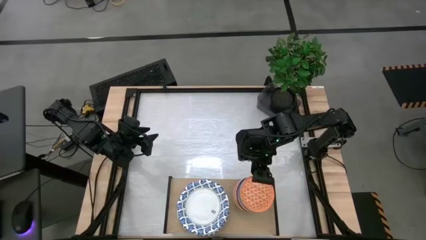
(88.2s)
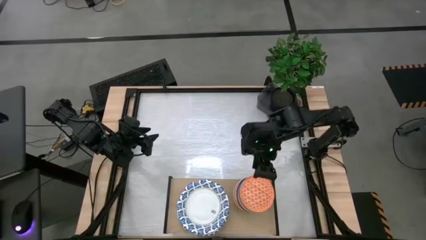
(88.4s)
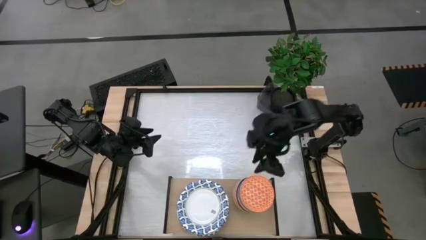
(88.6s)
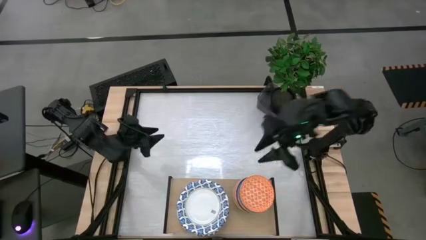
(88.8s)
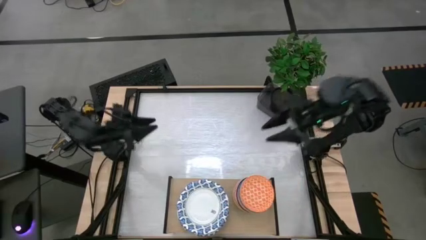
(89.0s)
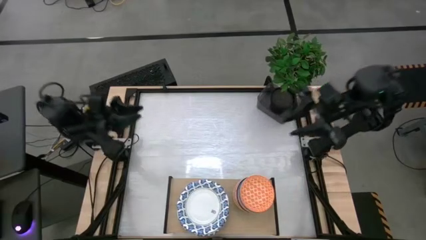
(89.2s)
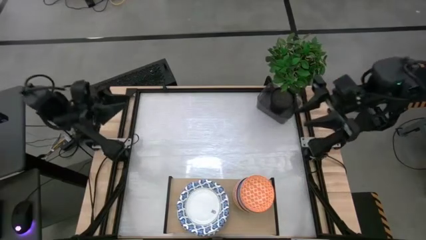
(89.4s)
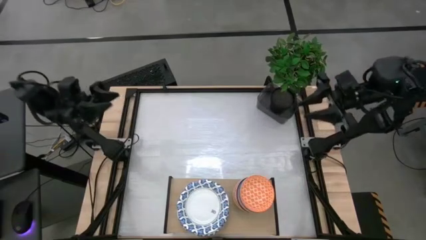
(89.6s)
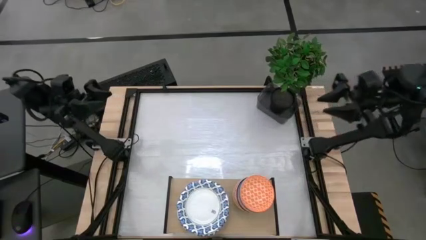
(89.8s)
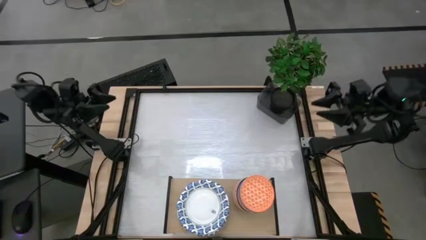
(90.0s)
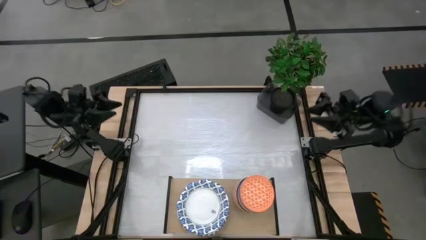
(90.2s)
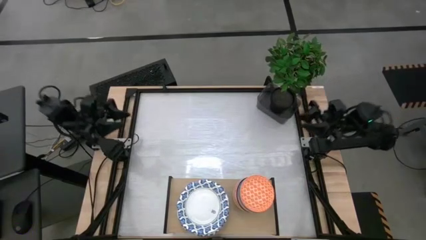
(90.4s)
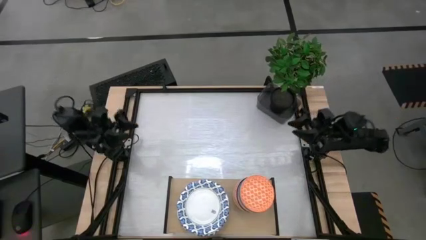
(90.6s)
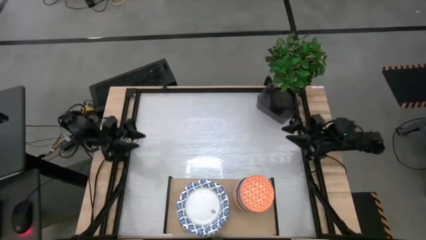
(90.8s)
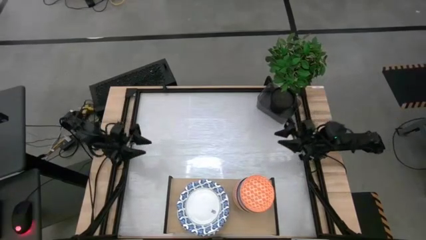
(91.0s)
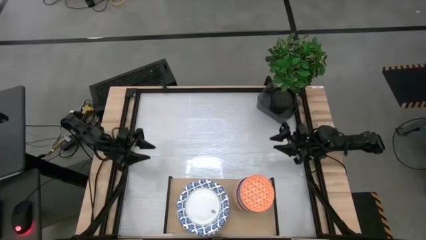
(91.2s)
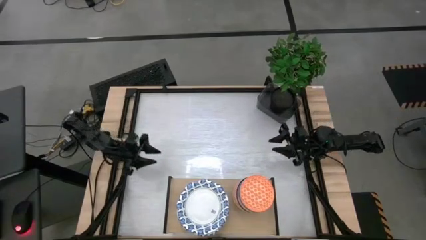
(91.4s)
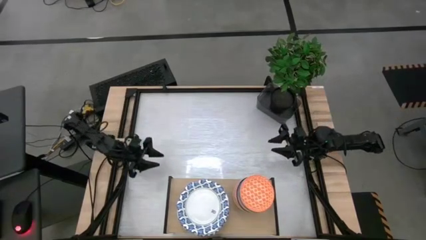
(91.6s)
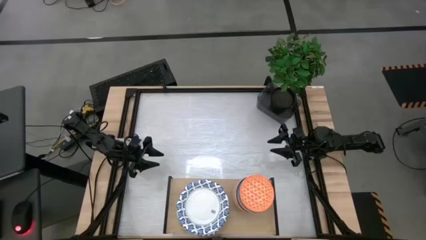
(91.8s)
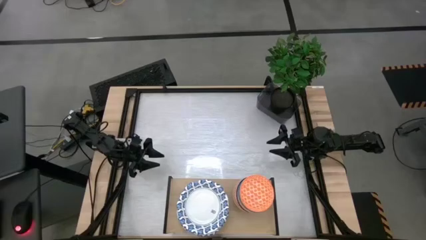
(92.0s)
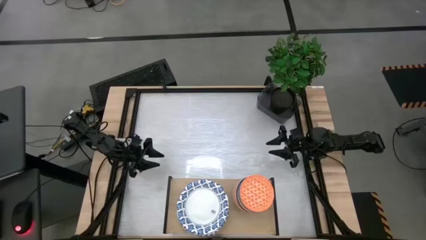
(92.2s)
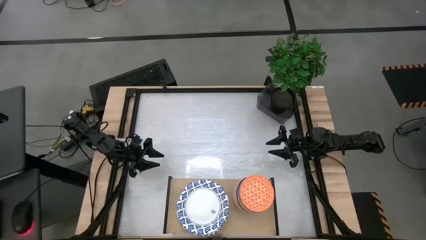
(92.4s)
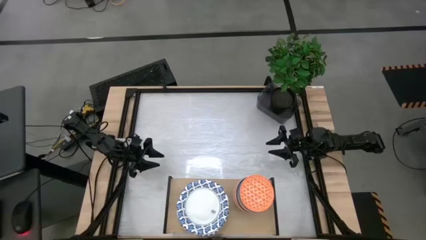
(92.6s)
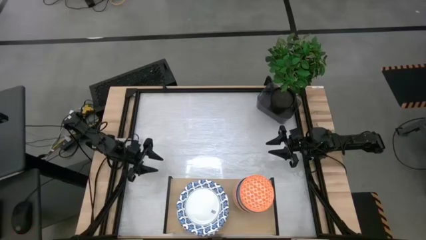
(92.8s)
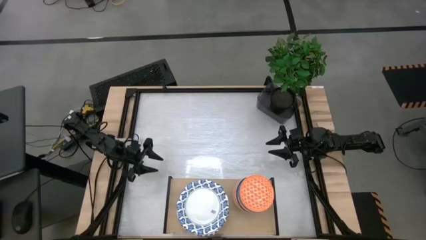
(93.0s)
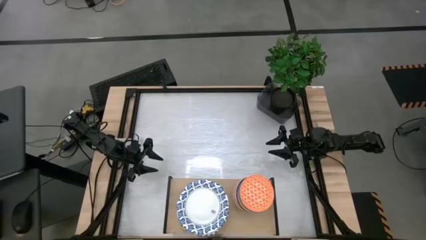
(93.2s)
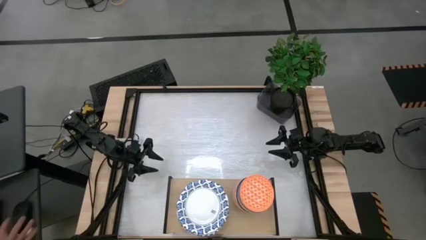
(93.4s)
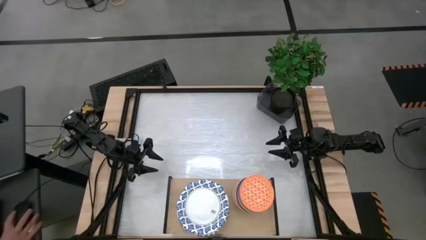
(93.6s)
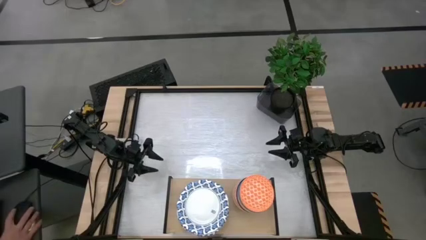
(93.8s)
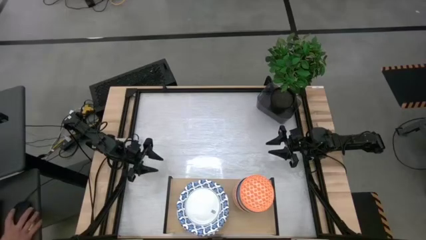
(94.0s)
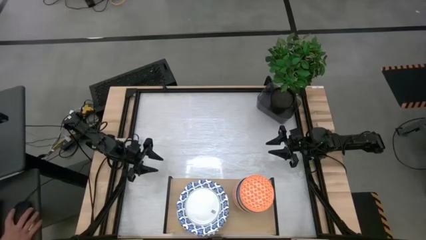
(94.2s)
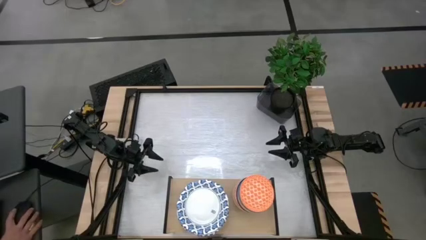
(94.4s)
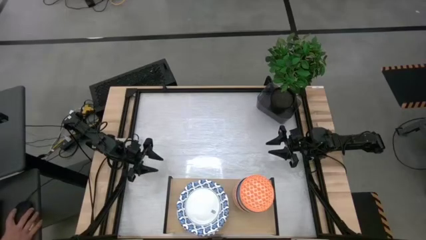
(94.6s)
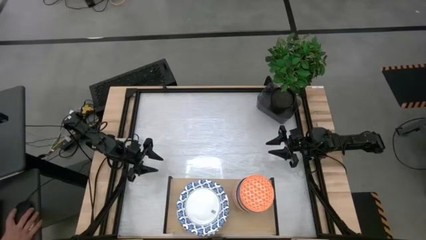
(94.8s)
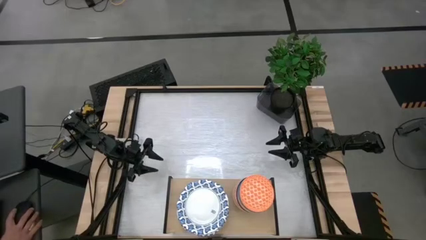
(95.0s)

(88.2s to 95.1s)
Task: Place and stack plates onto a shelf
Return to Home Position

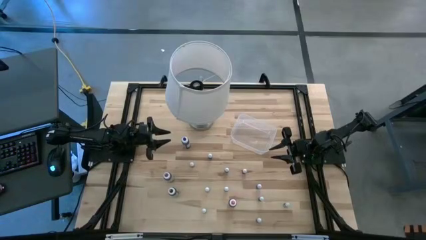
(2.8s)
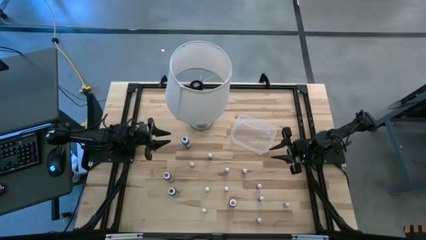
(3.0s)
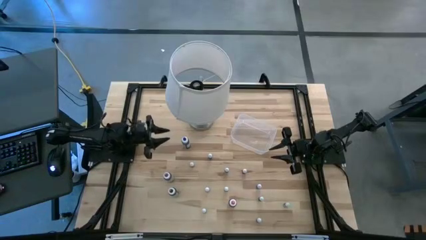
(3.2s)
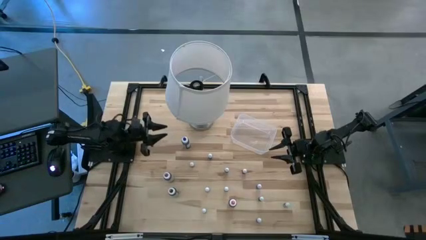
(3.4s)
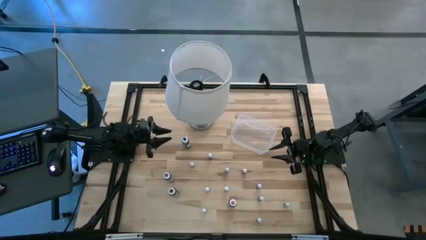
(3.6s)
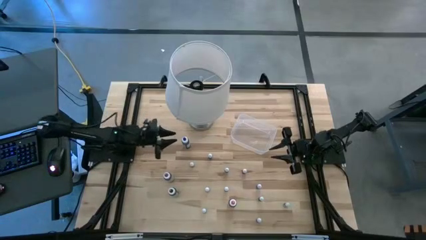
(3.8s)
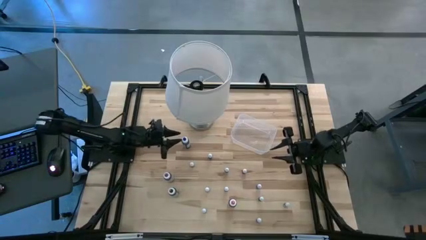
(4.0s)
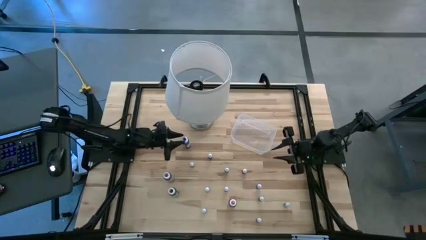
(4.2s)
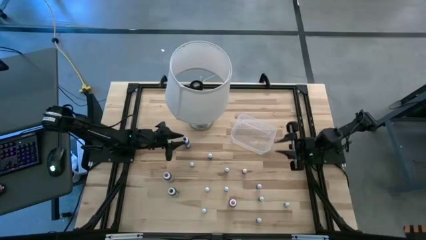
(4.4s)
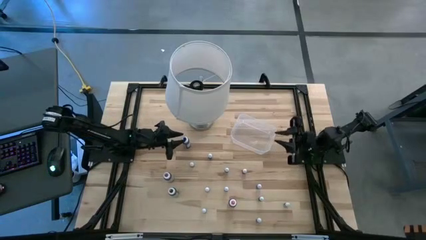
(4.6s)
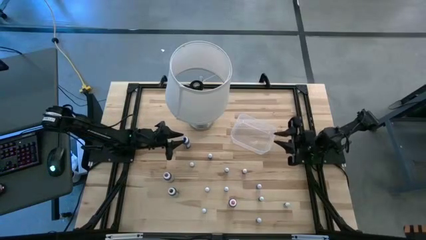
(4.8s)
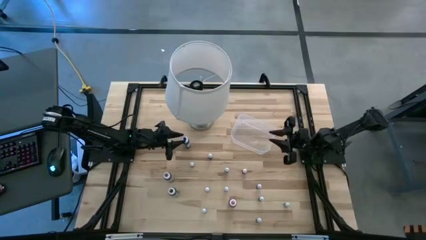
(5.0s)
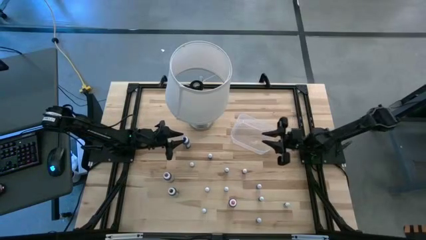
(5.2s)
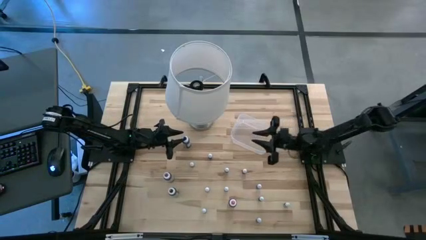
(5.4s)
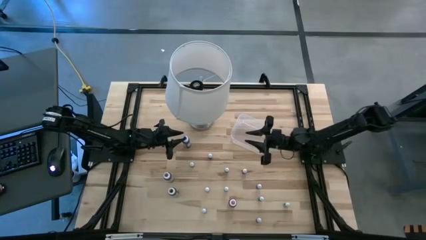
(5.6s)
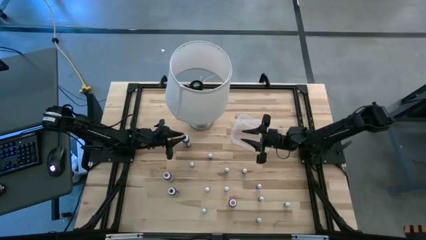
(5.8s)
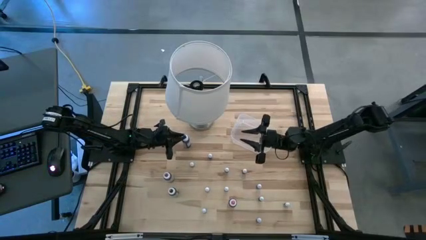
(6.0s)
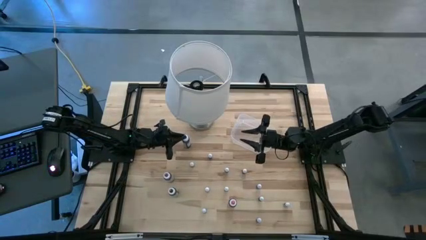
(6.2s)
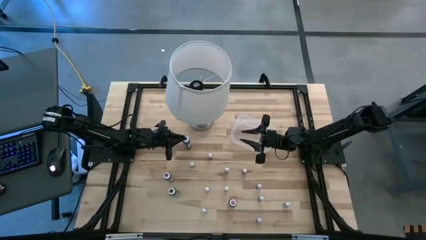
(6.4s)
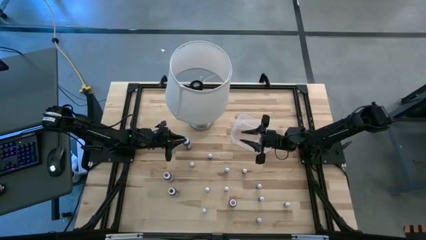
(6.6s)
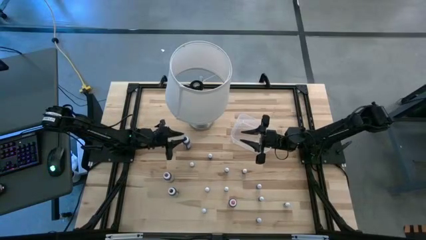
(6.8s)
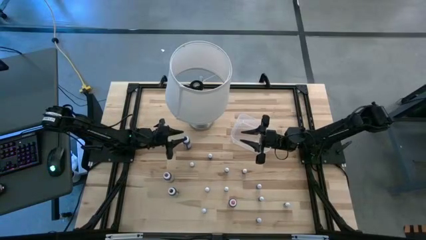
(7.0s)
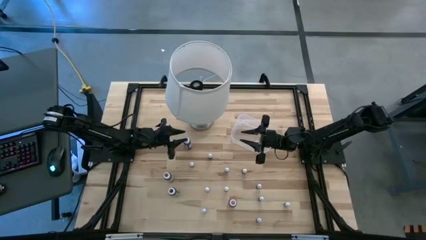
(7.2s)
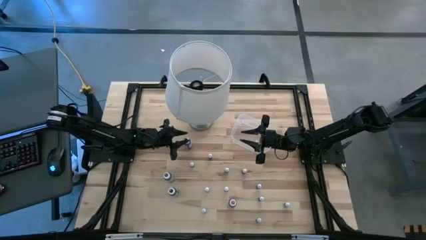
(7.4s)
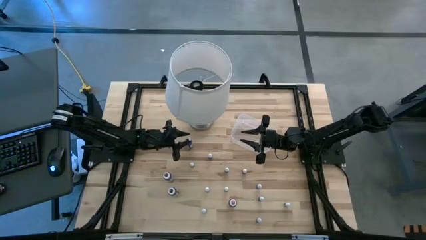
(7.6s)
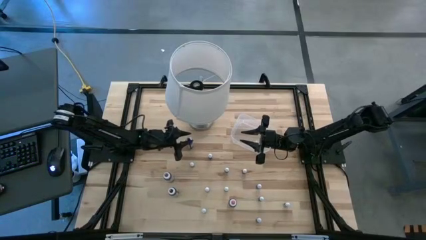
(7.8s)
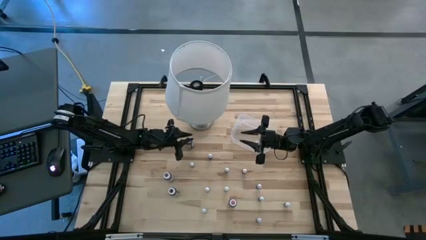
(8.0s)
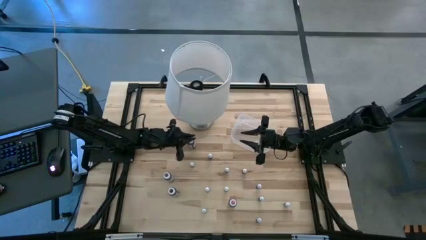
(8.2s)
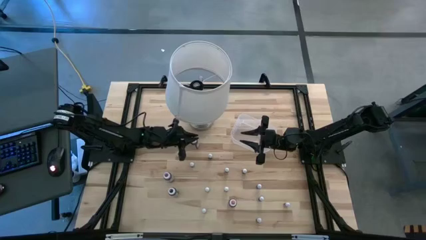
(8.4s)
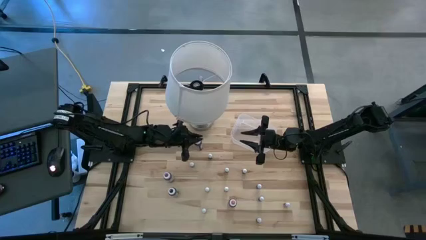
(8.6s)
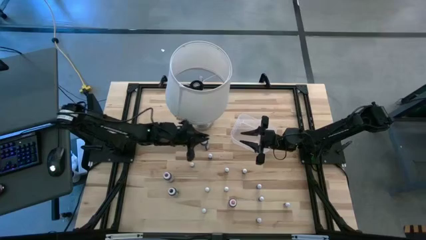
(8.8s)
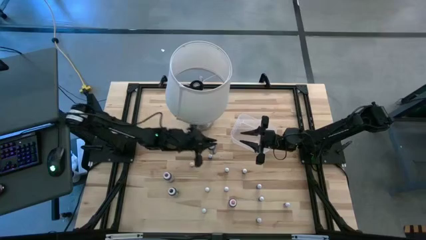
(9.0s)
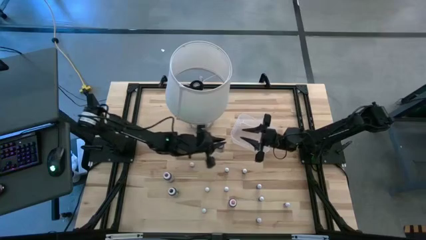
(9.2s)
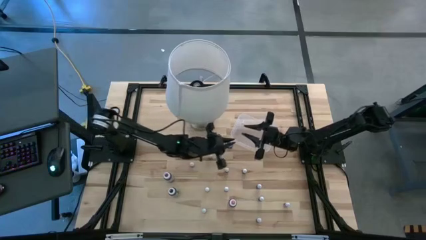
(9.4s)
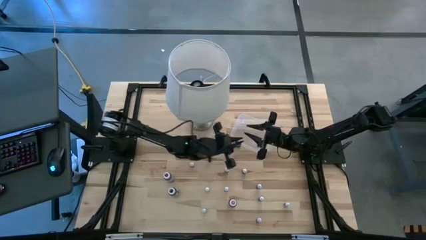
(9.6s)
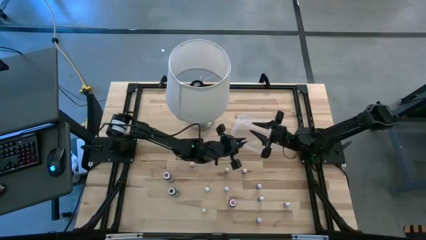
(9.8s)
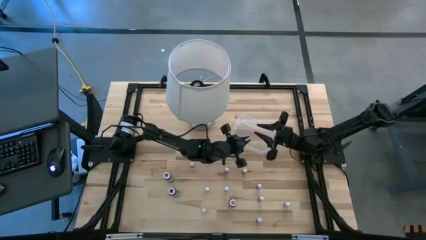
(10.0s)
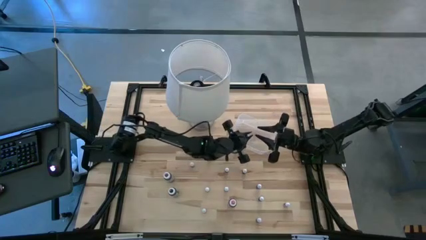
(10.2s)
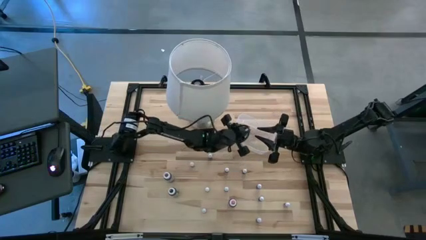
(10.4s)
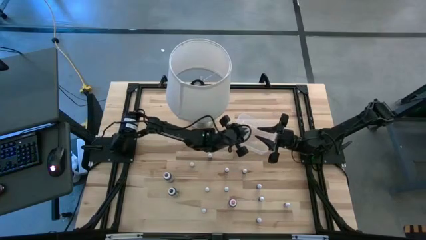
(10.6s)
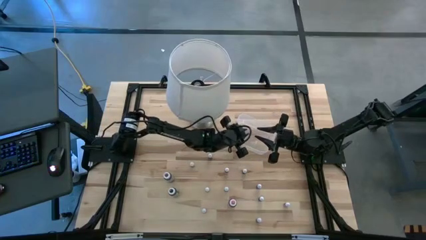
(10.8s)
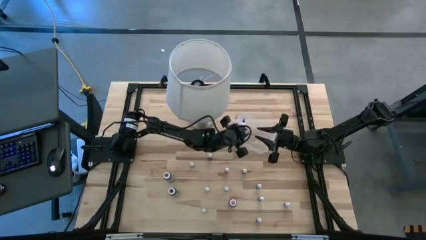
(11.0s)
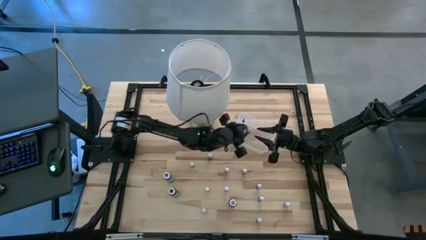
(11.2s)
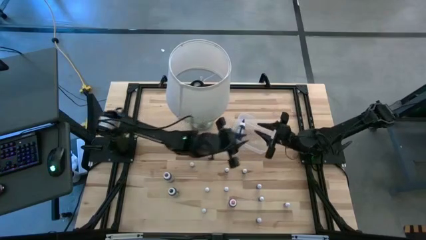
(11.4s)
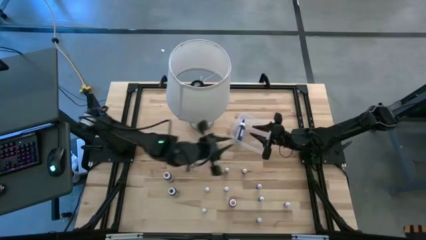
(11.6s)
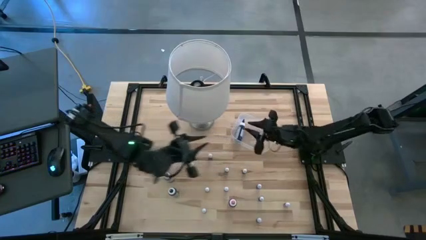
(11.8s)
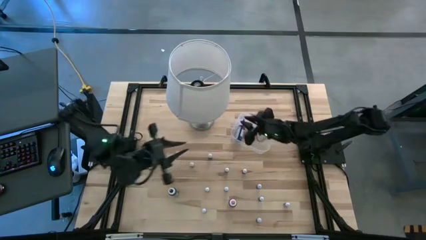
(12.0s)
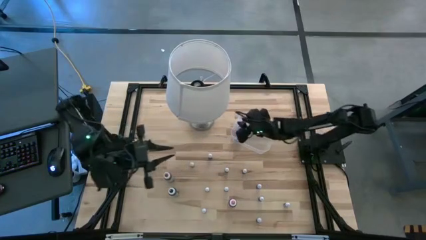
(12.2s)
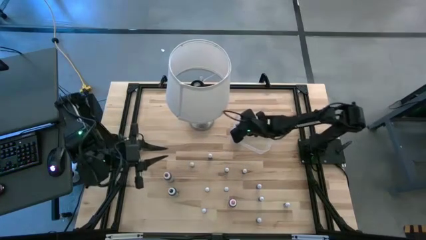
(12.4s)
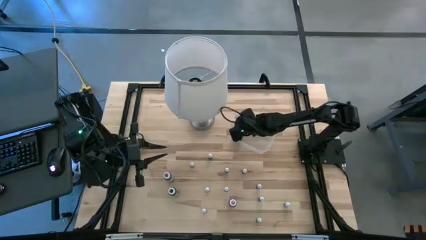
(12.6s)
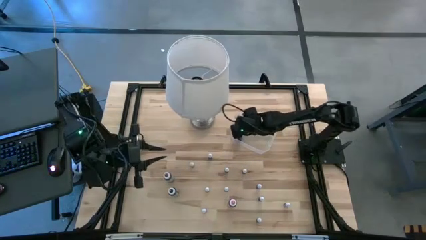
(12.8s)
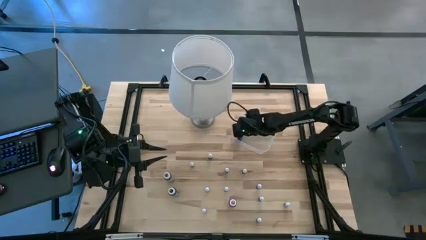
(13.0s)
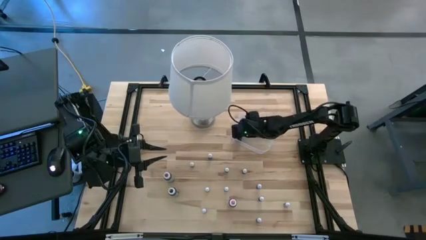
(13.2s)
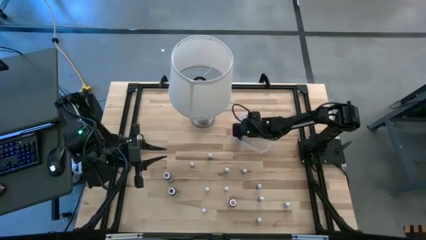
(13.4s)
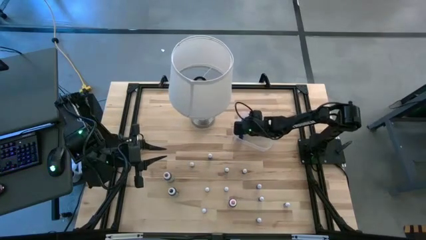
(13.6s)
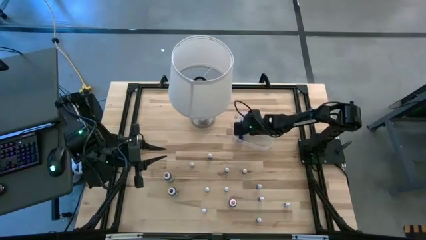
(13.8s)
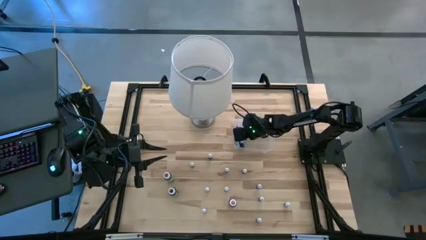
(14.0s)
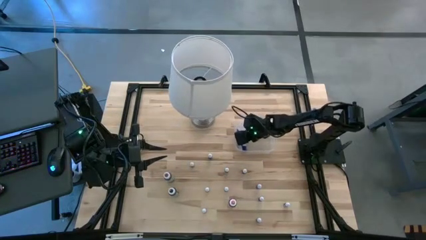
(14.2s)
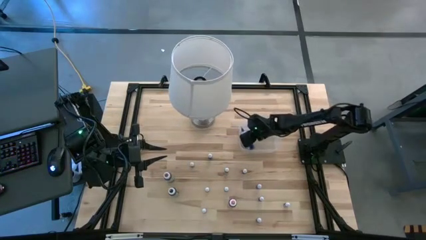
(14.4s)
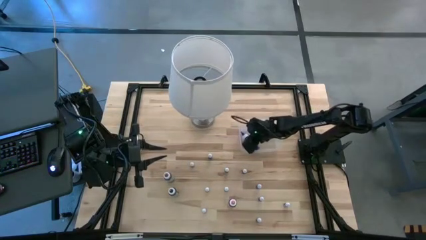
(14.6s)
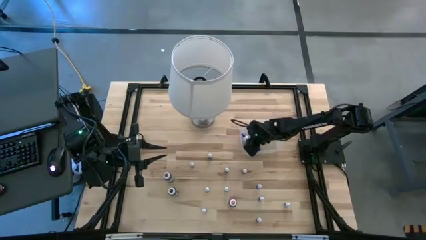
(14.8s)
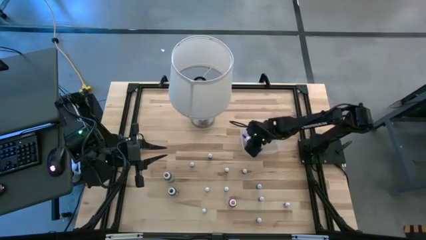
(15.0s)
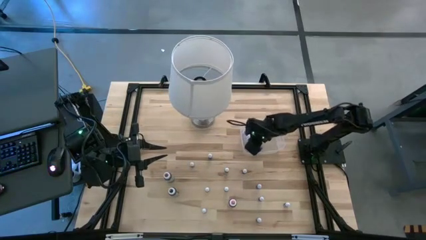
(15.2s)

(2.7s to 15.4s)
Task: Pick & Place food coloring
Put the large blue food coloring bottle into the transparent bin
